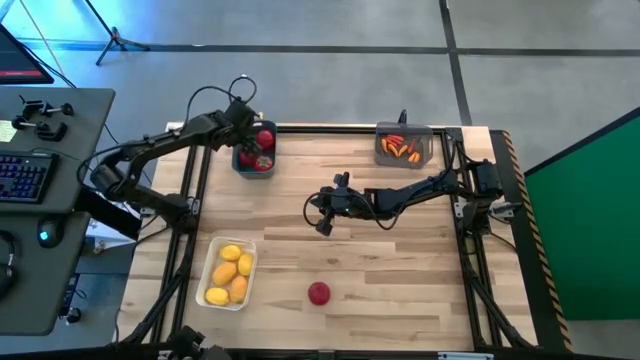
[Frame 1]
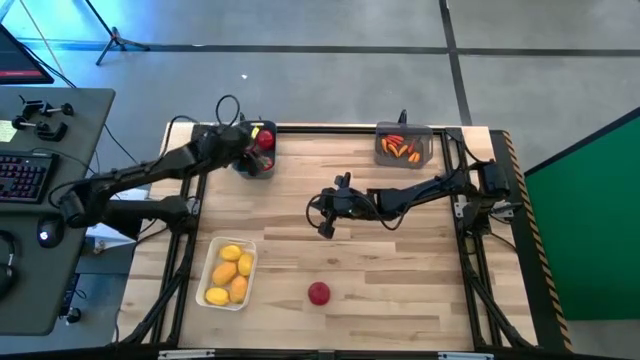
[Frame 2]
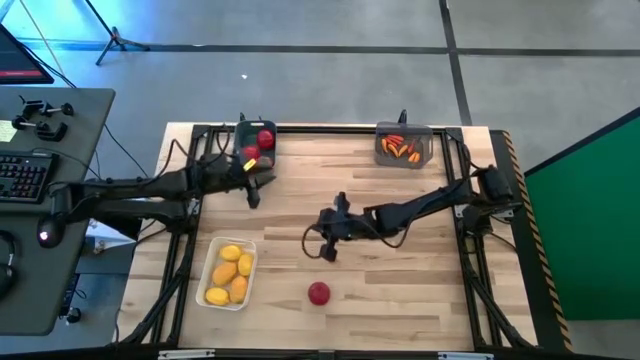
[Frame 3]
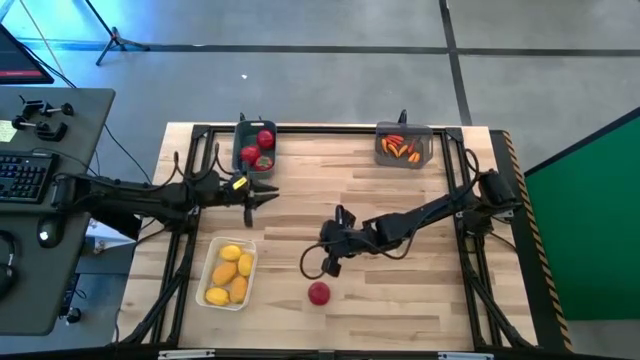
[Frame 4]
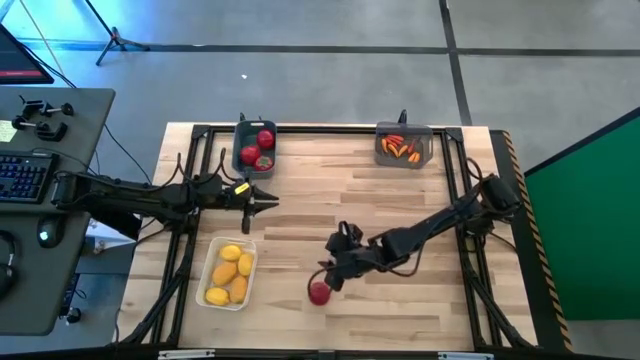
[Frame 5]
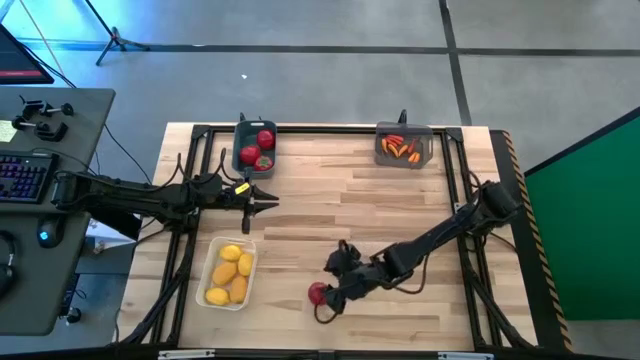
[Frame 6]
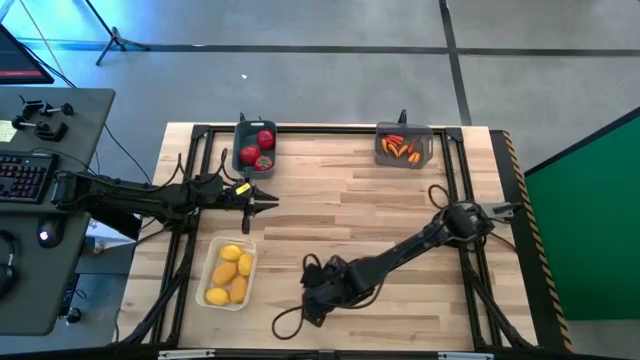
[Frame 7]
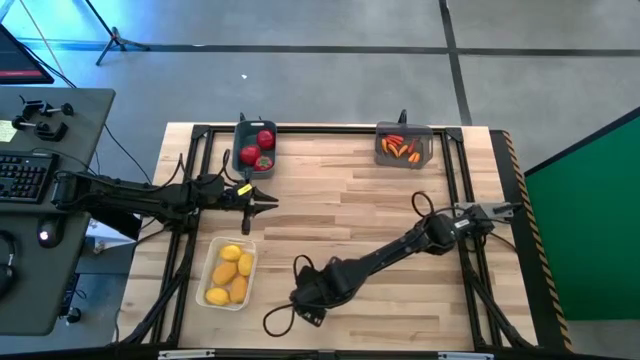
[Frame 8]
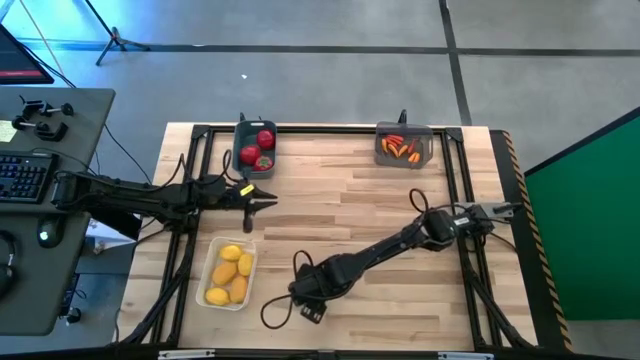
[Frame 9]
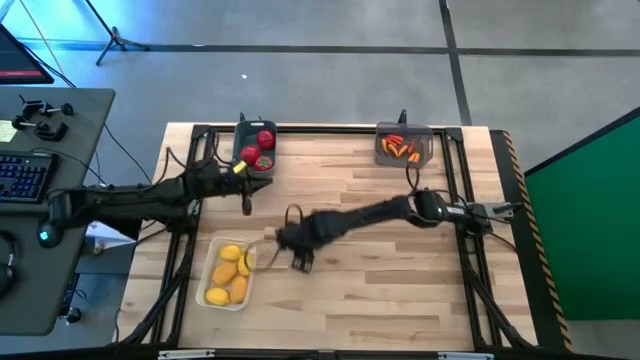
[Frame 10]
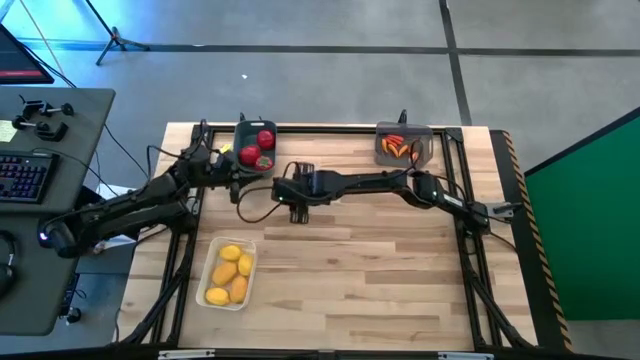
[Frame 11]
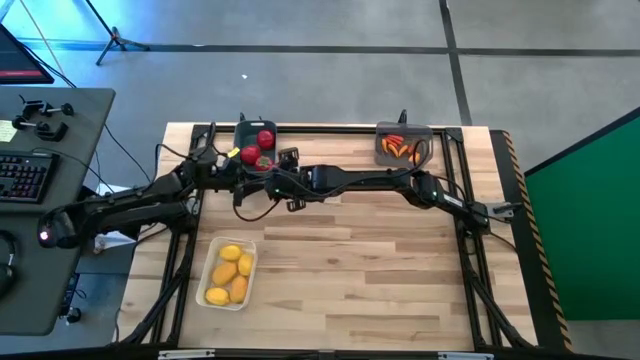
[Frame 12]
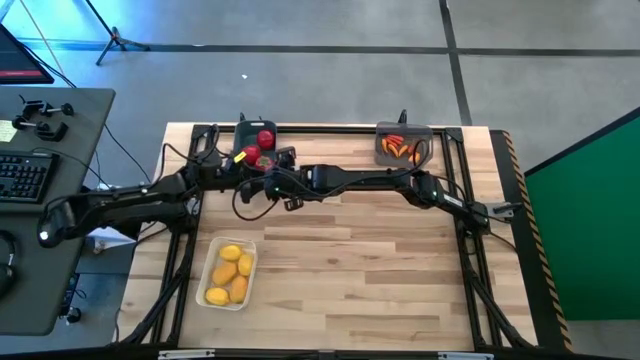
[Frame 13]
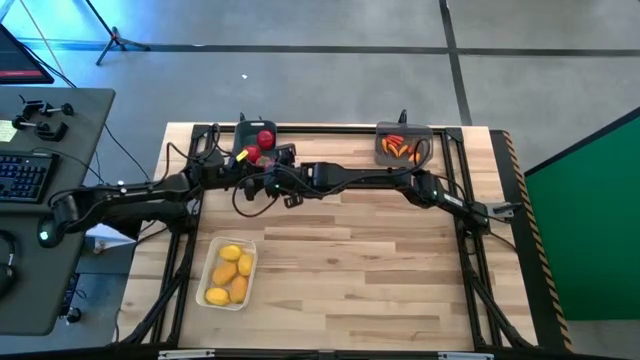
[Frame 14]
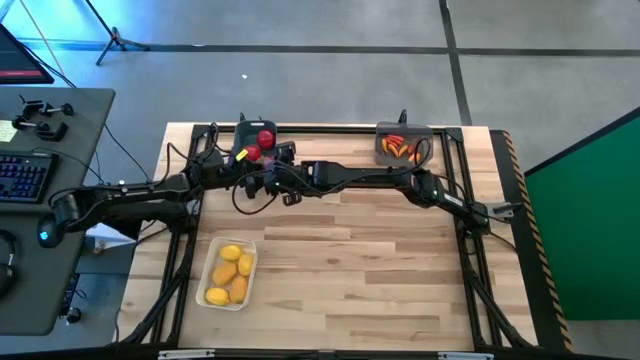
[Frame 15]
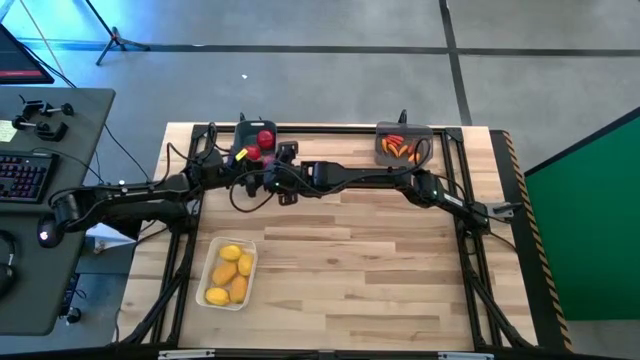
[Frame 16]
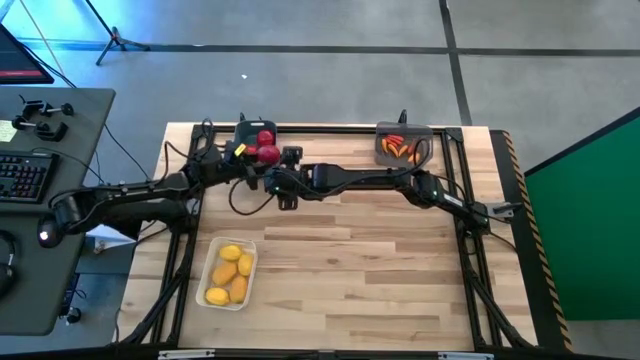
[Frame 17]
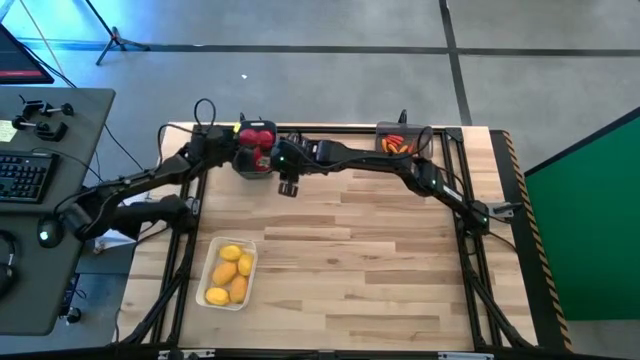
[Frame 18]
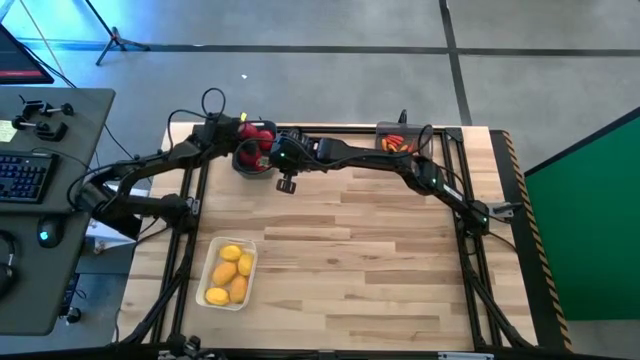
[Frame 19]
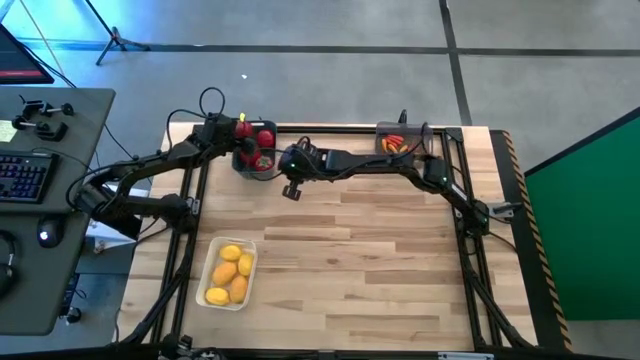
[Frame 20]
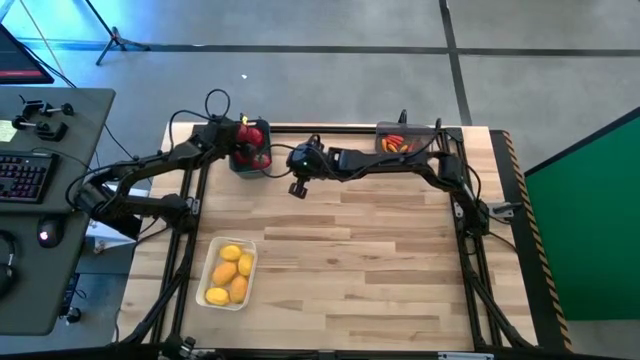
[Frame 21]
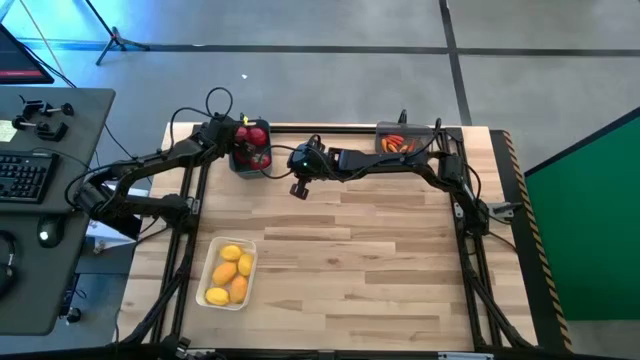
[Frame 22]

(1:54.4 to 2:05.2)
Task: Sort produce into baskets
Put the red tomato into the green bin

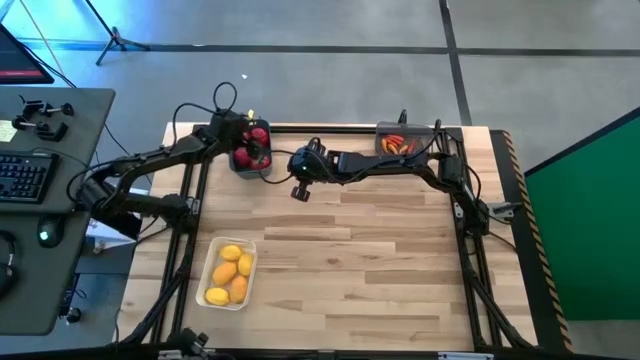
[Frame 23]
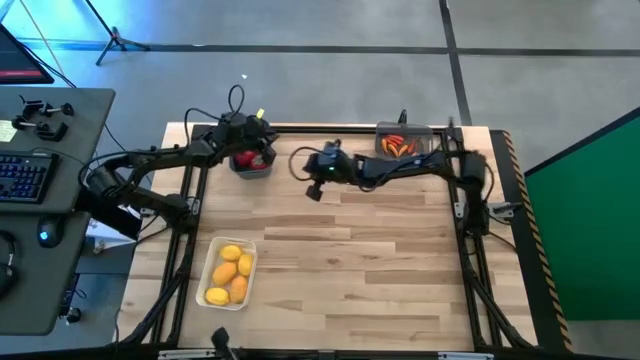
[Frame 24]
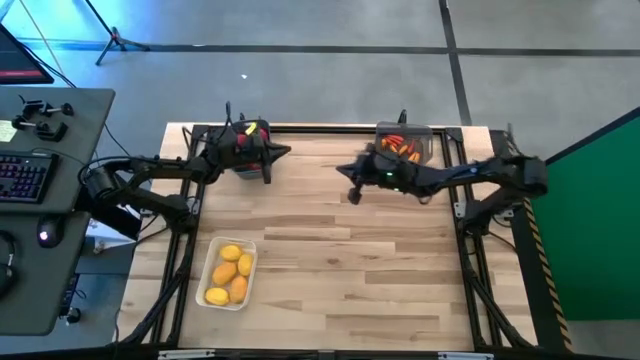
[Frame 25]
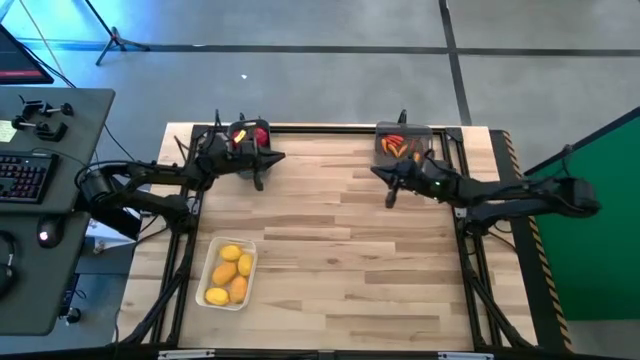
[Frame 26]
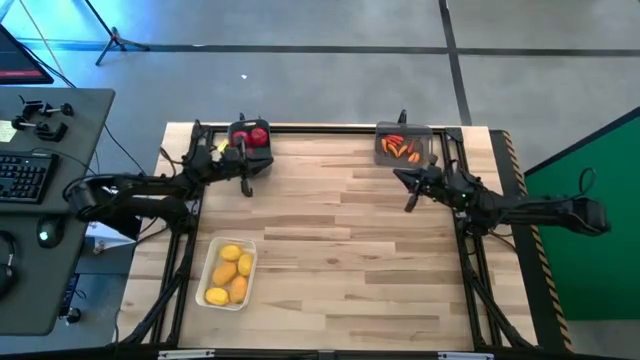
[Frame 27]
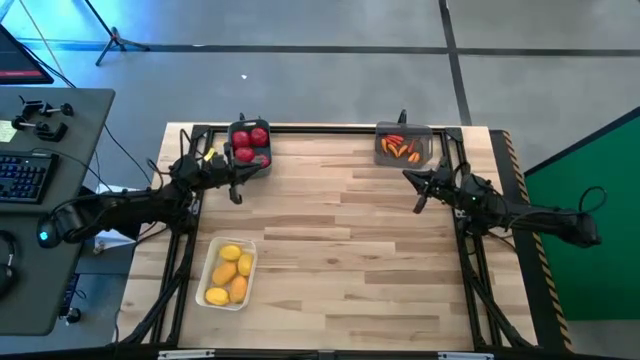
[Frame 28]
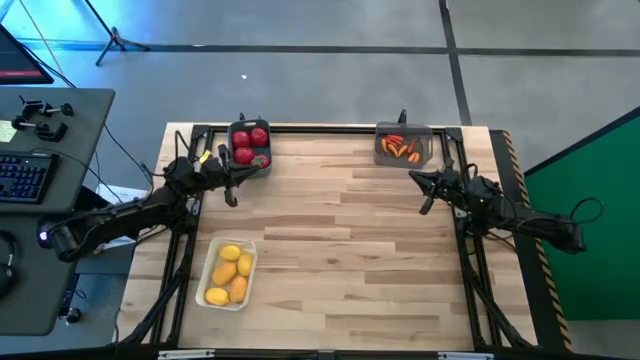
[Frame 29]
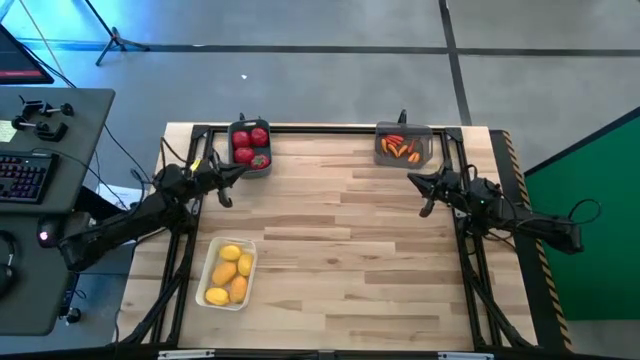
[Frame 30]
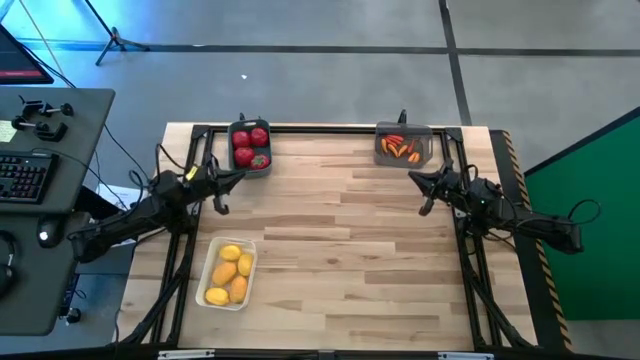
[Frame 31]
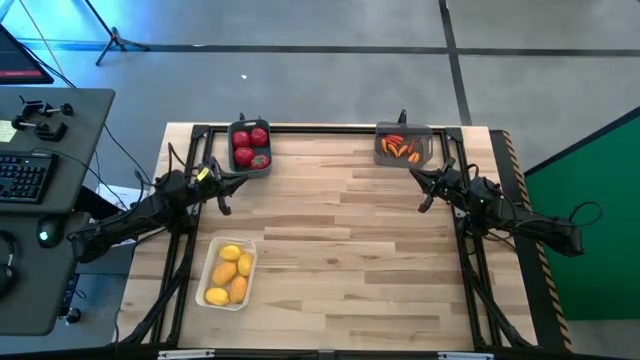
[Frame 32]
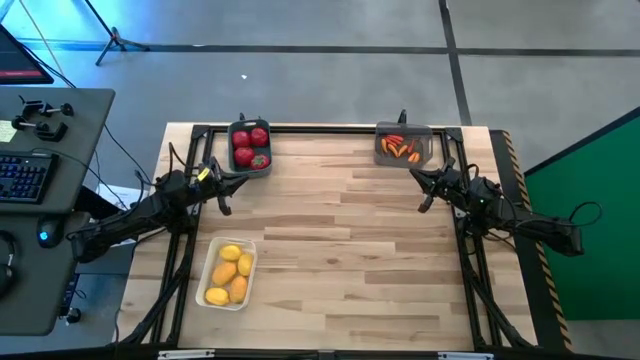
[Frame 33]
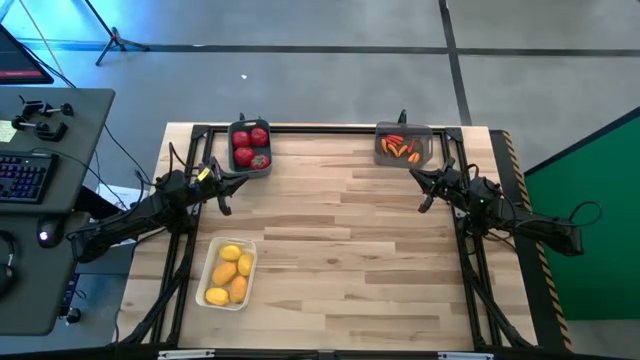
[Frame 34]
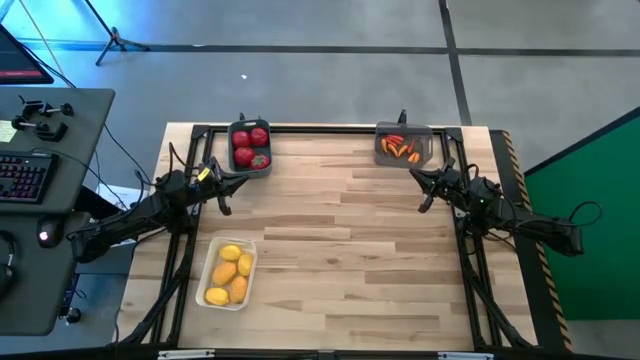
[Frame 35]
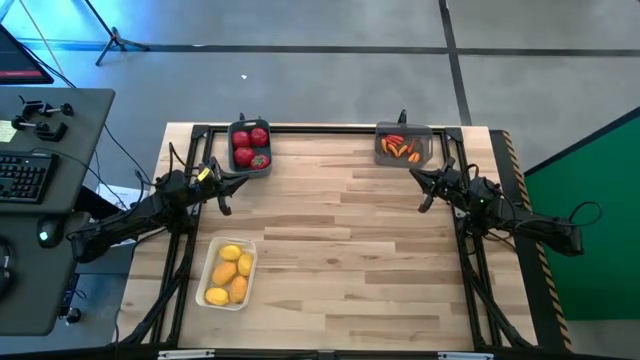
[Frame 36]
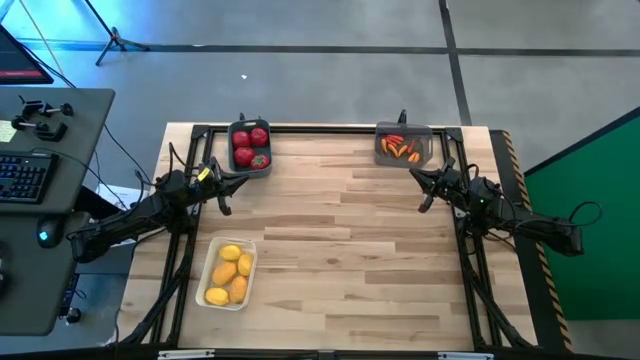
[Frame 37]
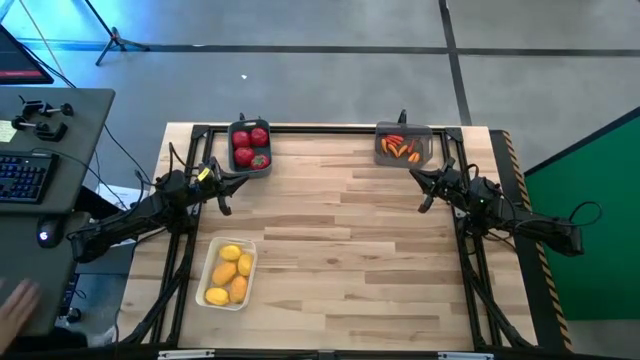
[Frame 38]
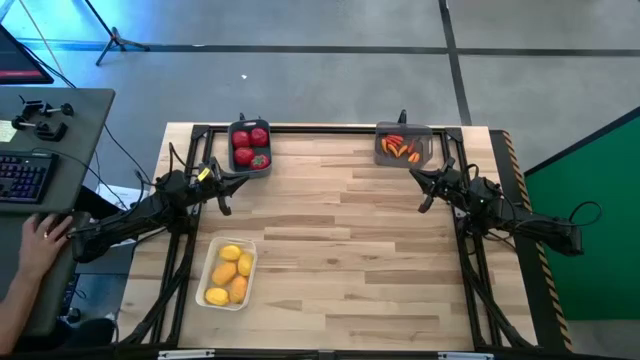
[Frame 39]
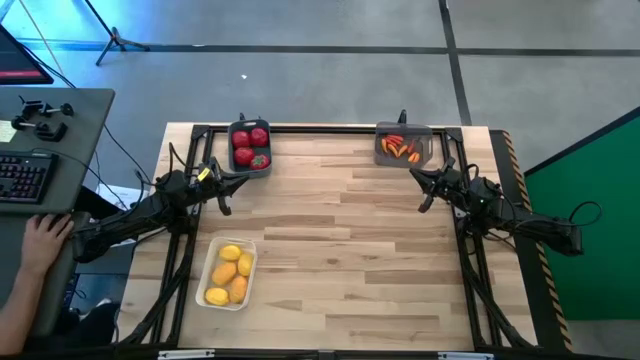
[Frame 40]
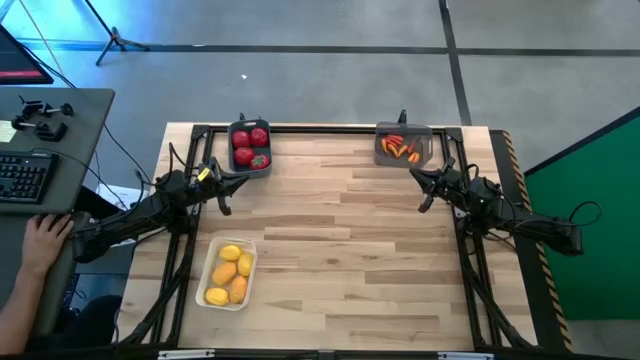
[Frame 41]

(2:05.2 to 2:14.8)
Return to Home Position
